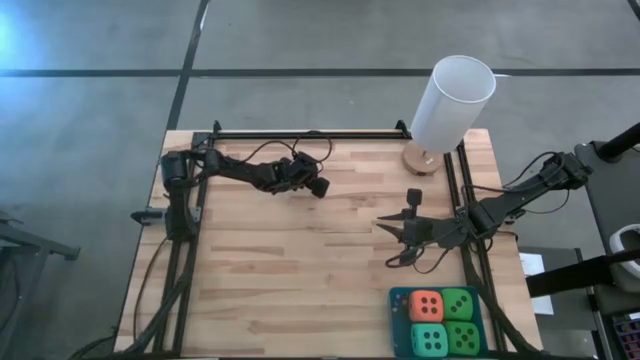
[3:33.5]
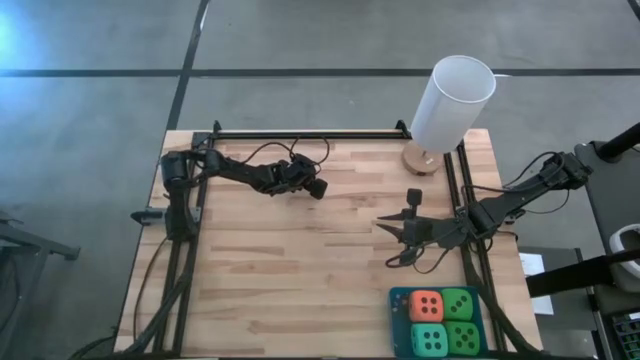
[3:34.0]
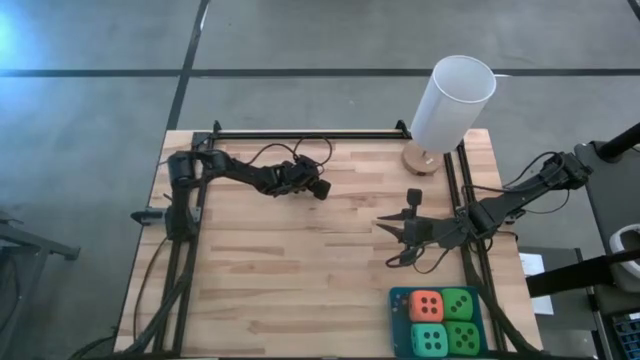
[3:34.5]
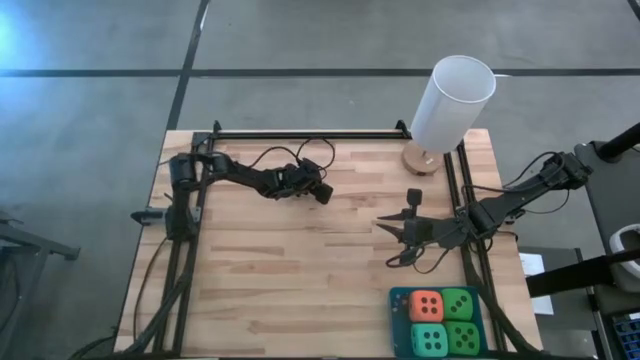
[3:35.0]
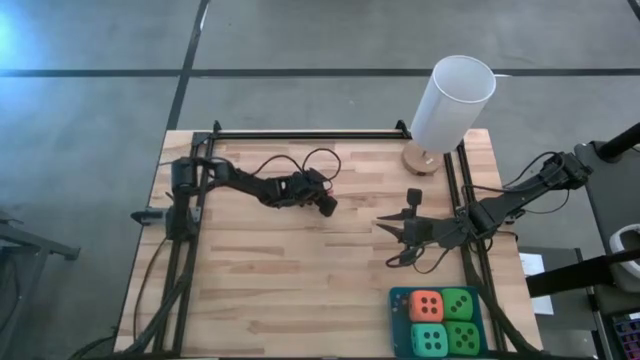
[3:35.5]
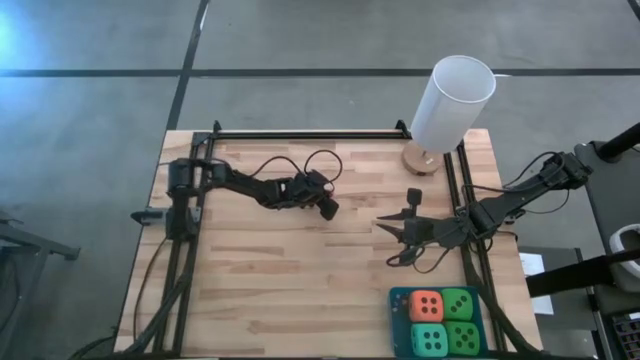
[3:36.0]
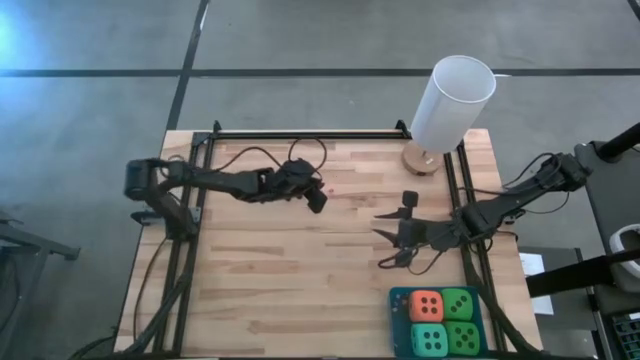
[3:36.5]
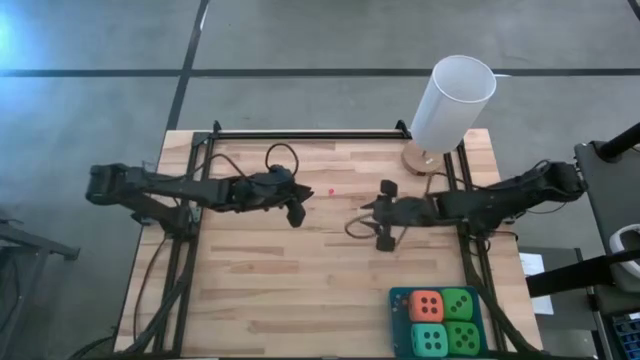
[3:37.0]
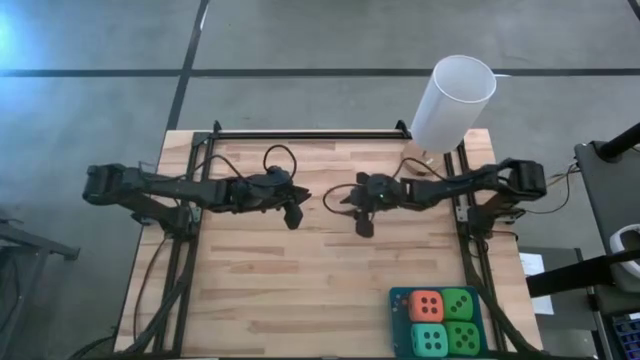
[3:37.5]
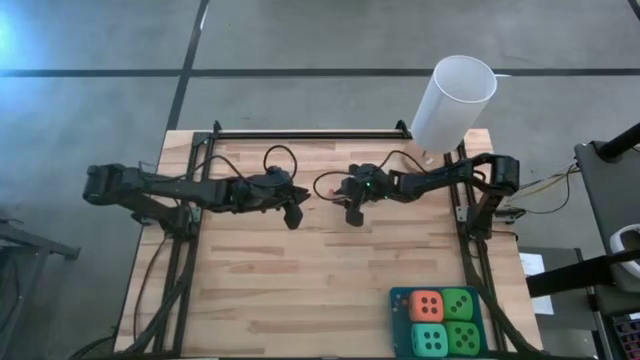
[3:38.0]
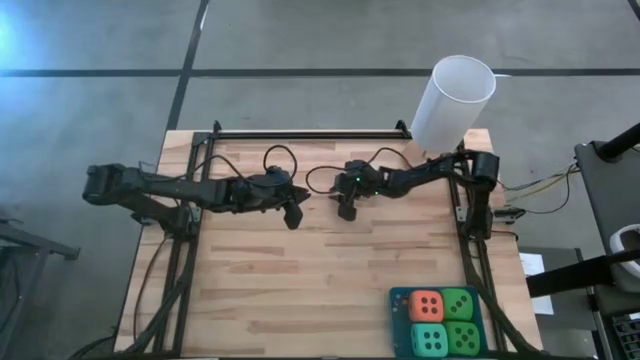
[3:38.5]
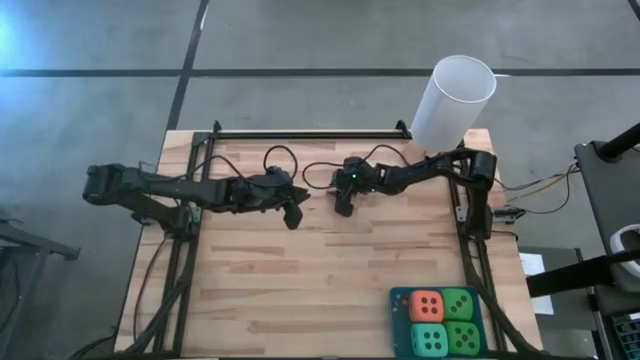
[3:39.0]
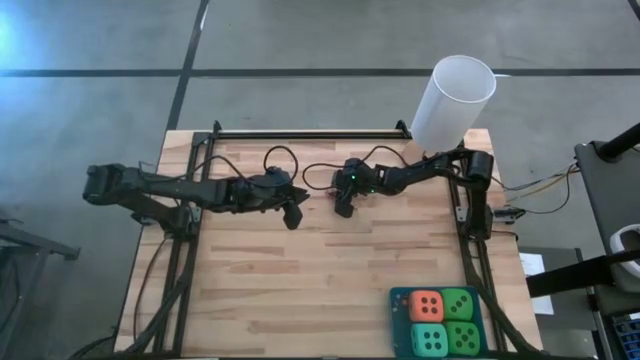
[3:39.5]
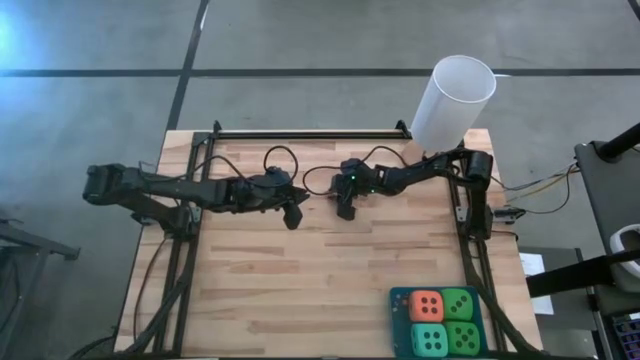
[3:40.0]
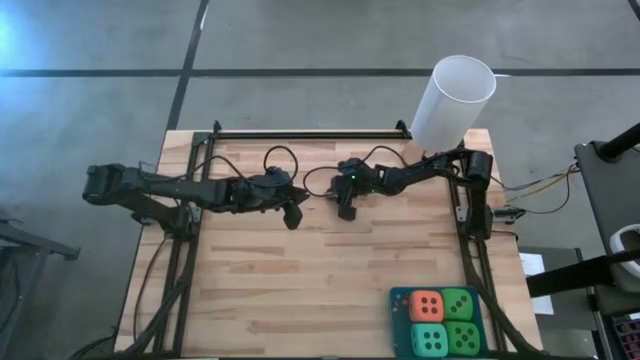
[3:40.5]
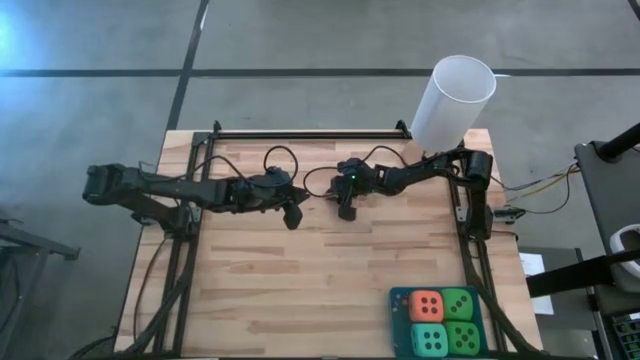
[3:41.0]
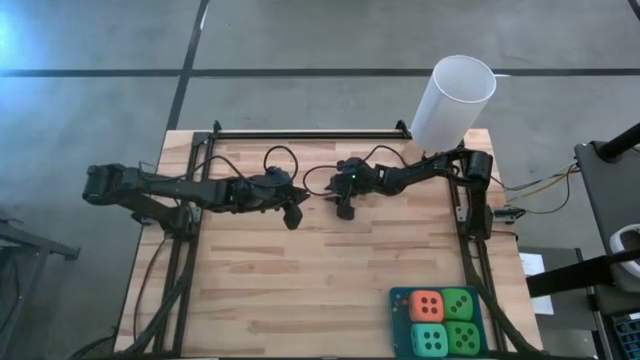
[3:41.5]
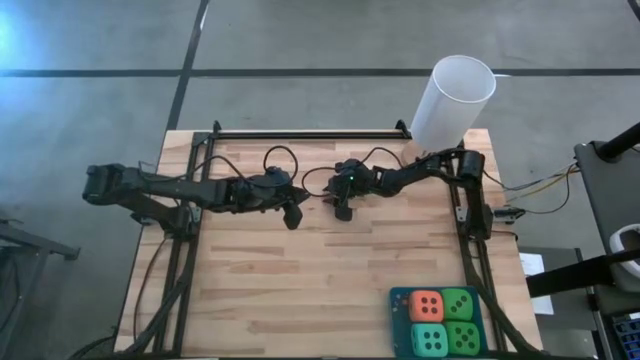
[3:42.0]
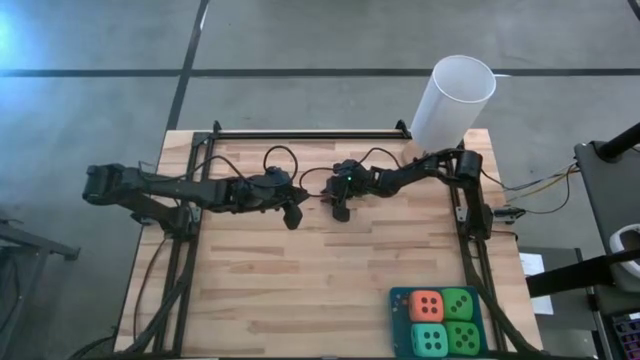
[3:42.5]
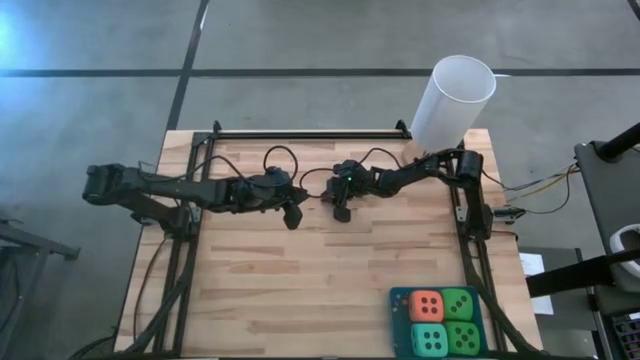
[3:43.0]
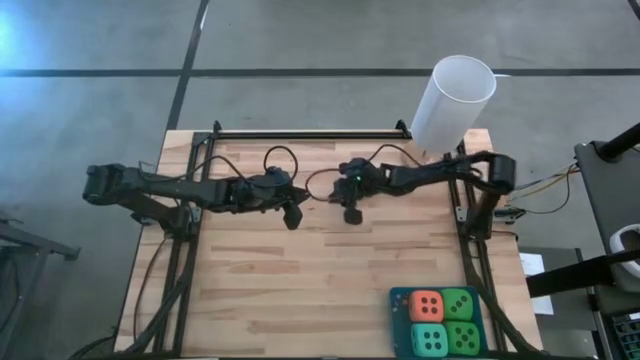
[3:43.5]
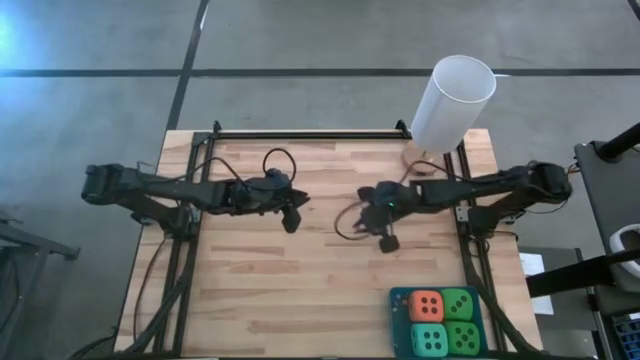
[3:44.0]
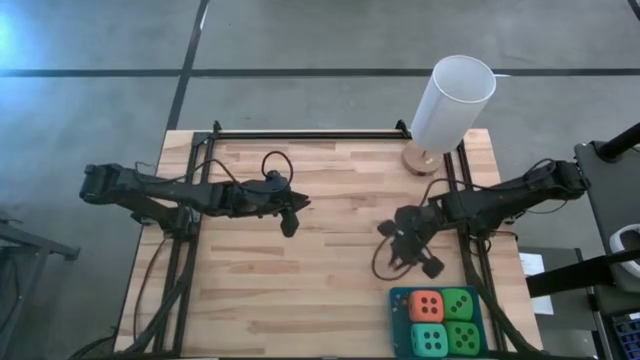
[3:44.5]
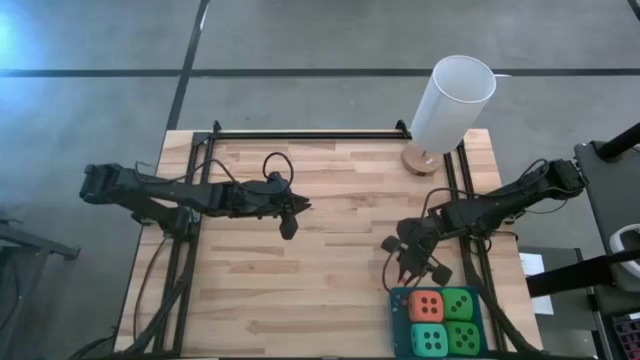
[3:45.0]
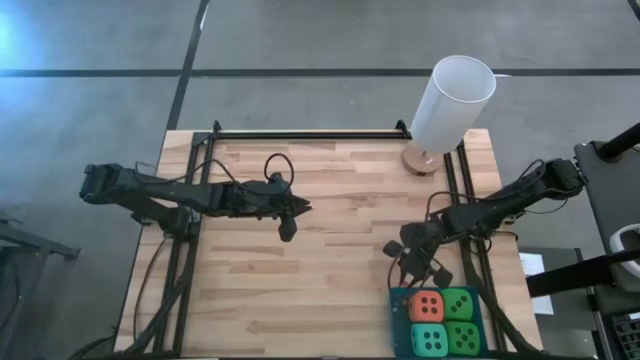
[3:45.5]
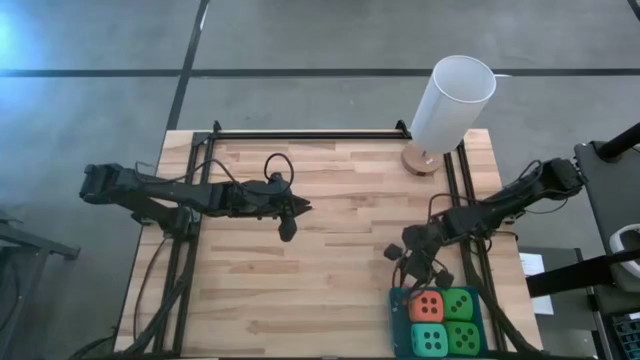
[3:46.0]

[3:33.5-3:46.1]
Task: Pick & Place Dice
Put the small pink die into the blue bin

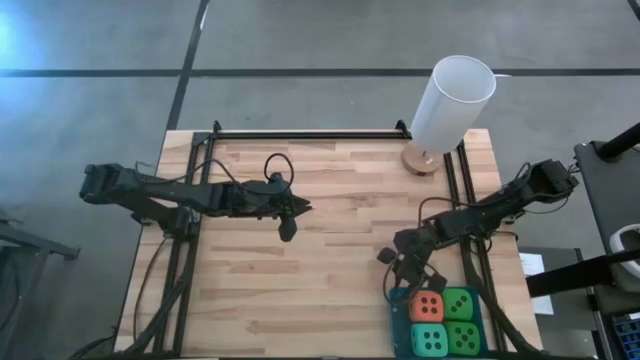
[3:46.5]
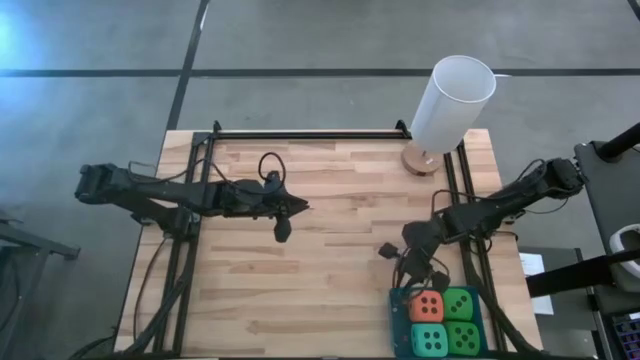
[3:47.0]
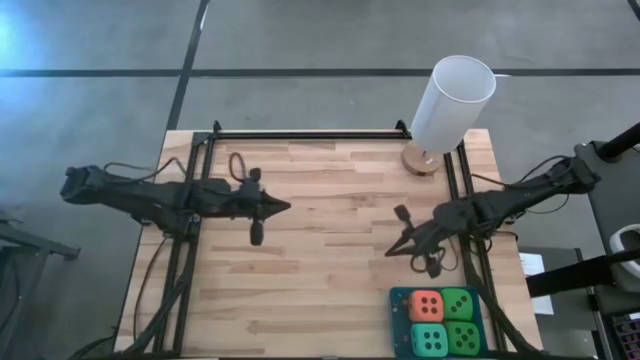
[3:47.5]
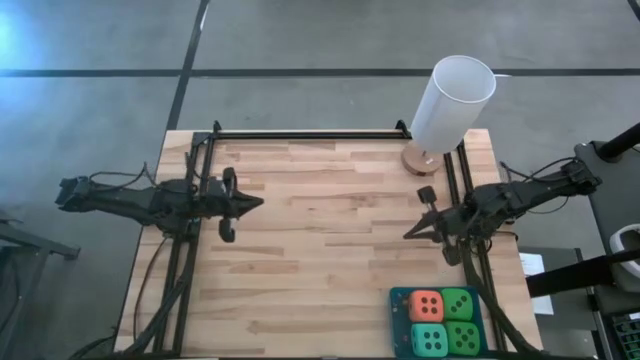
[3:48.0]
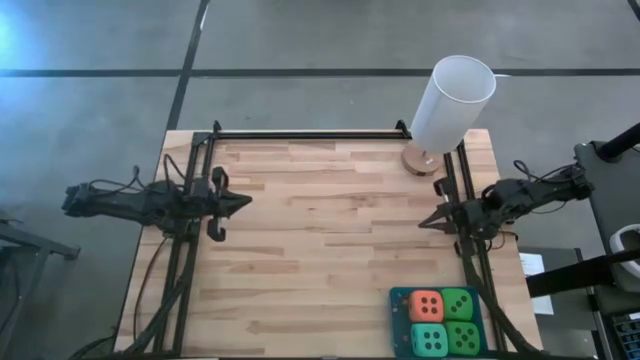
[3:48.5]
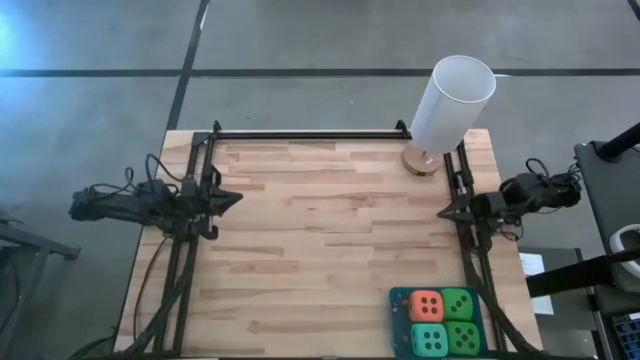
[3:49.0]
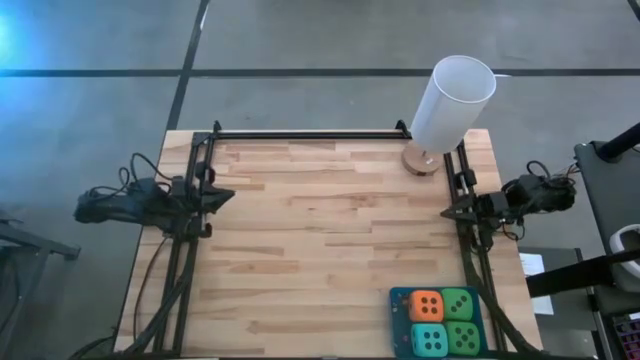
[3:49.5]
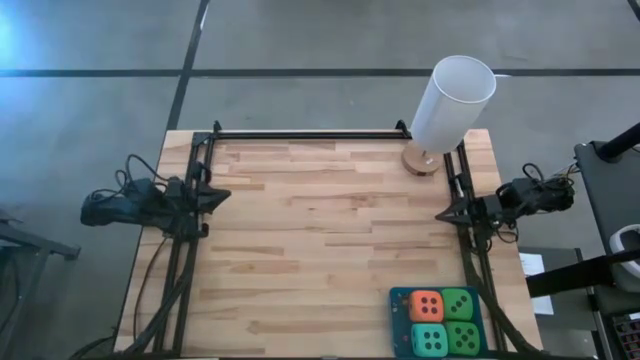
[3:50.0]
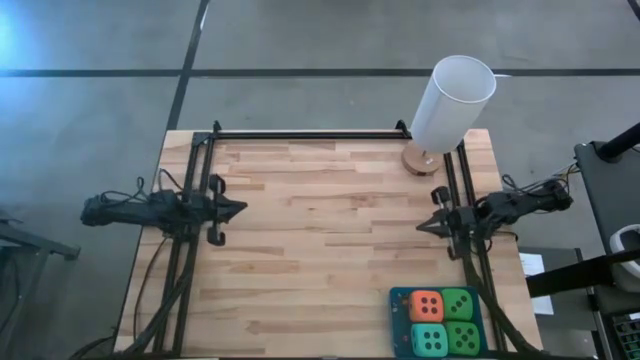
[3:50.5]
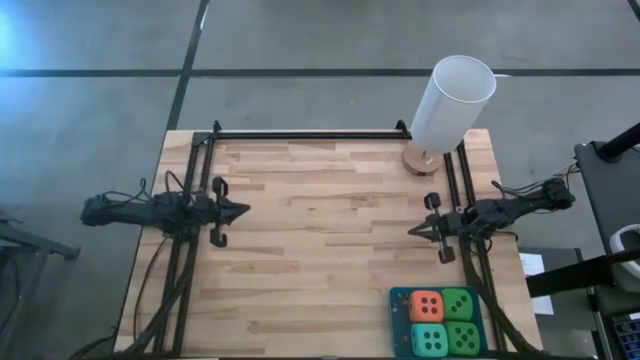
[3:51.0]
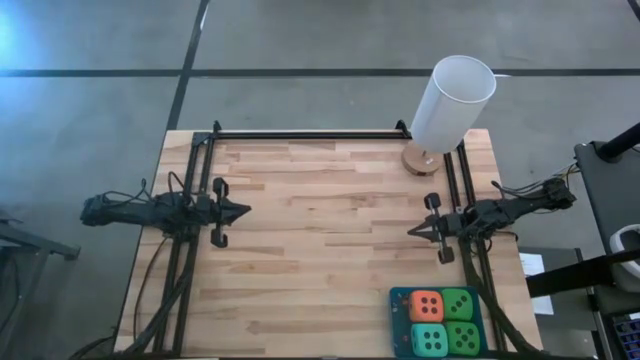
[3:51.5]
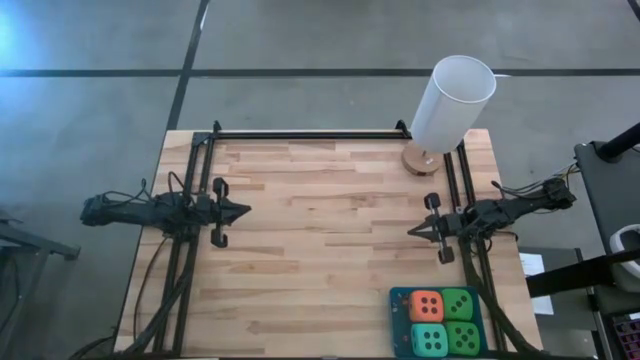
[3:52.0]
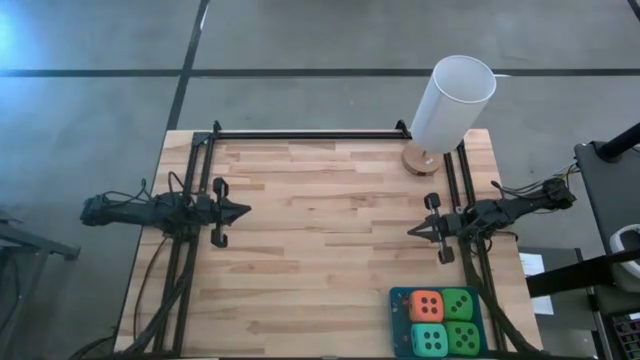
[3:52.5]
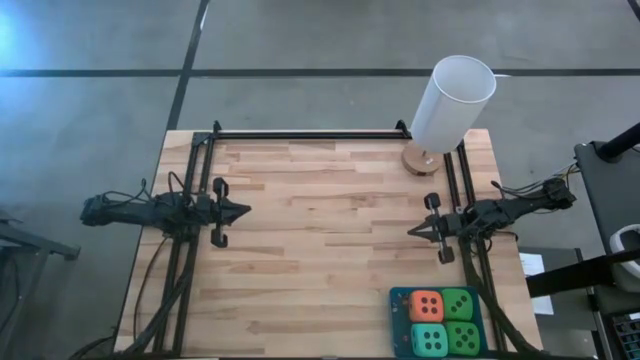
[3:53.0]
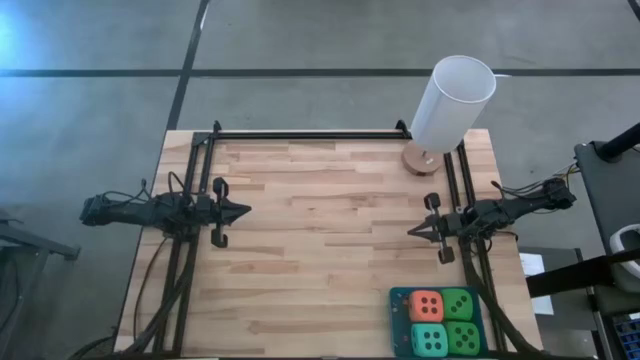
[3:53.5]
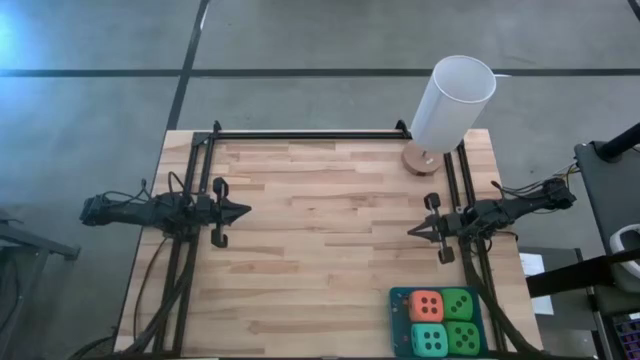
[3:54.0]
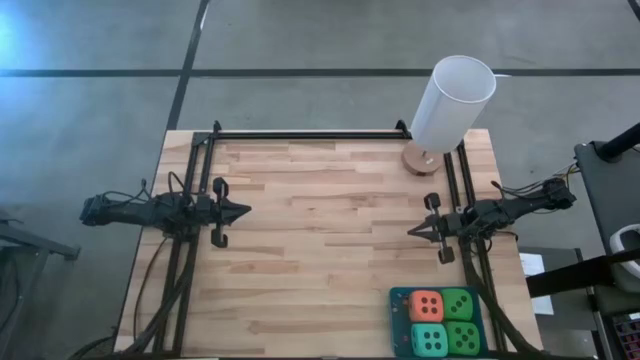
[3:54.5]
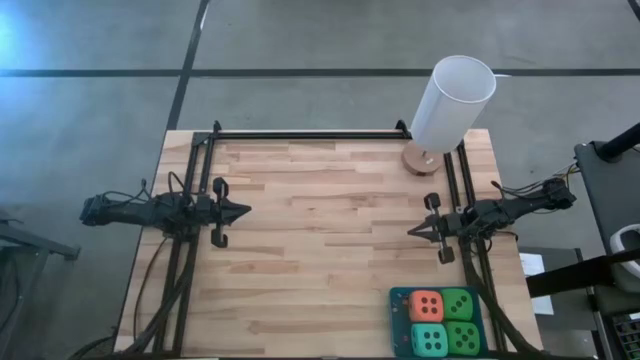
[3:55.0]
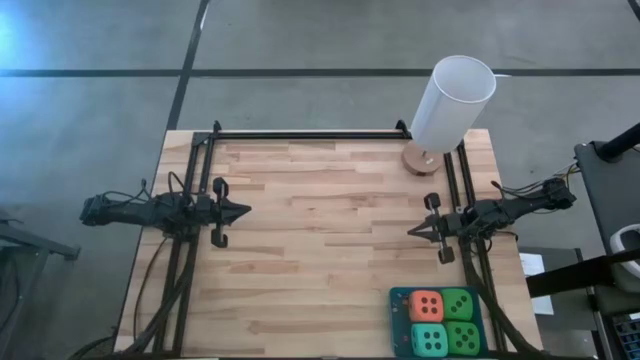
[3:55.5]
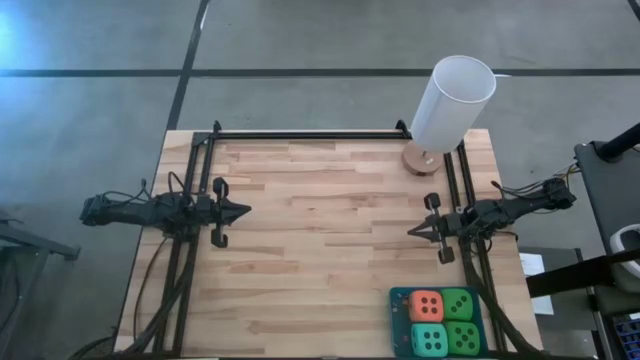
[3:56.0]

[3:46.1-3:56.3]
Return to Home Position
